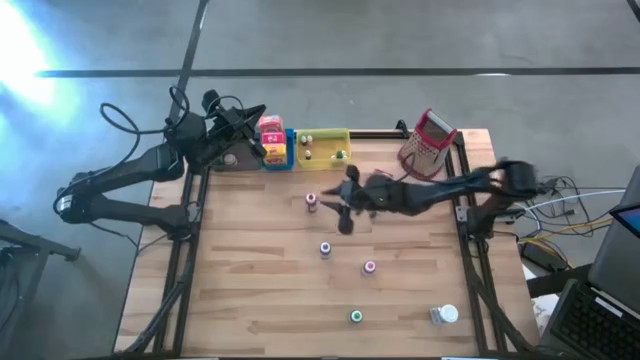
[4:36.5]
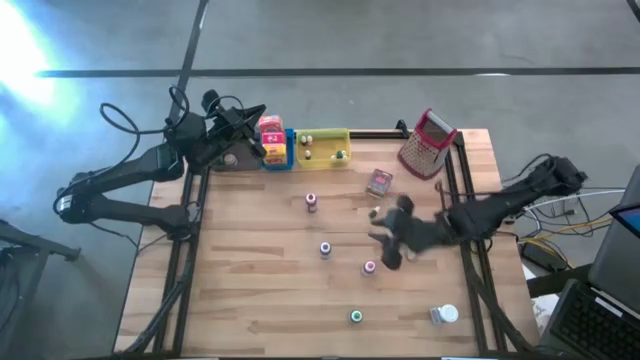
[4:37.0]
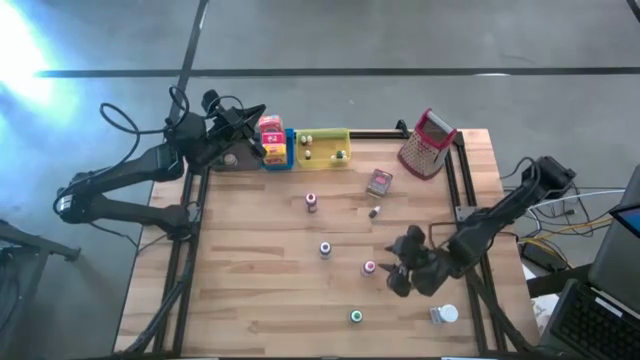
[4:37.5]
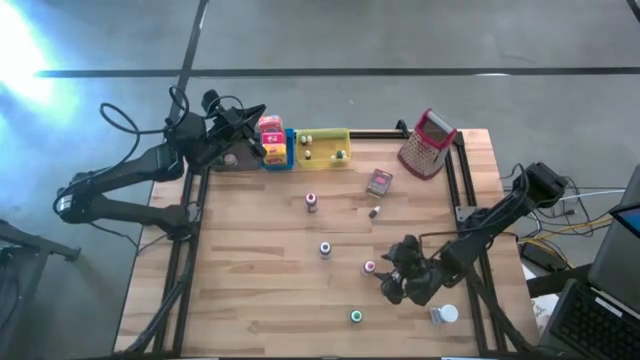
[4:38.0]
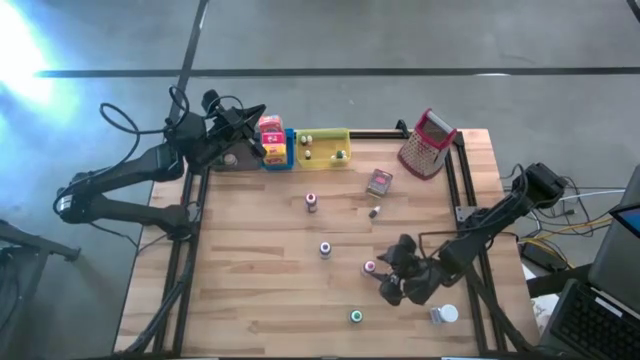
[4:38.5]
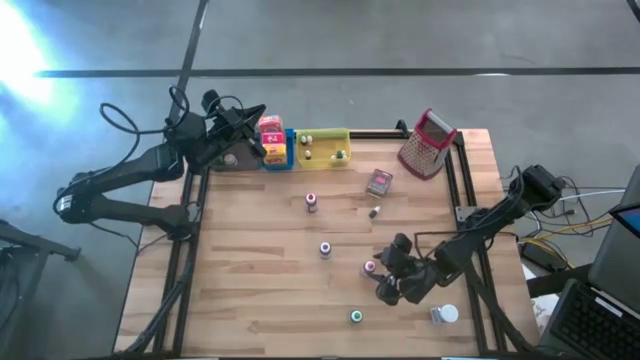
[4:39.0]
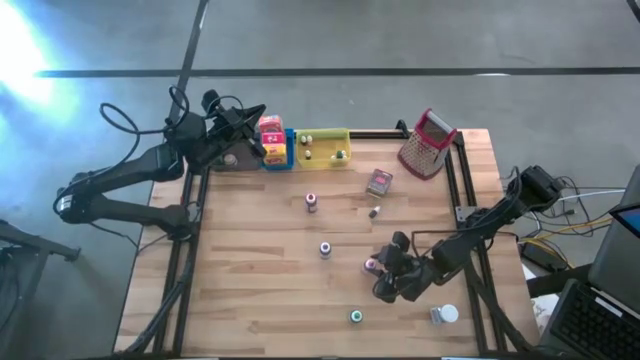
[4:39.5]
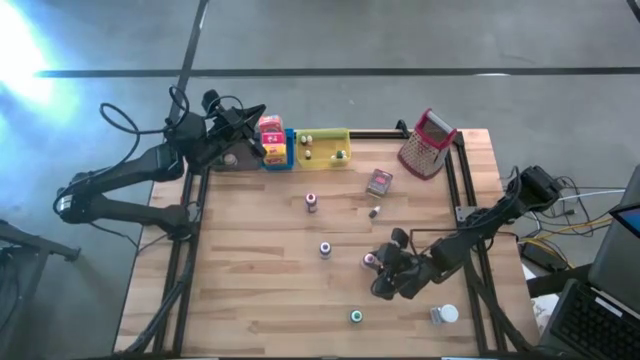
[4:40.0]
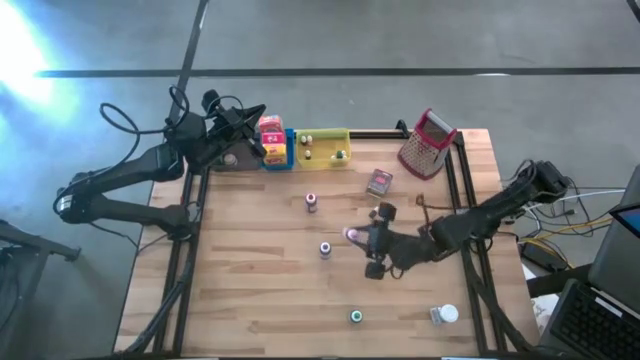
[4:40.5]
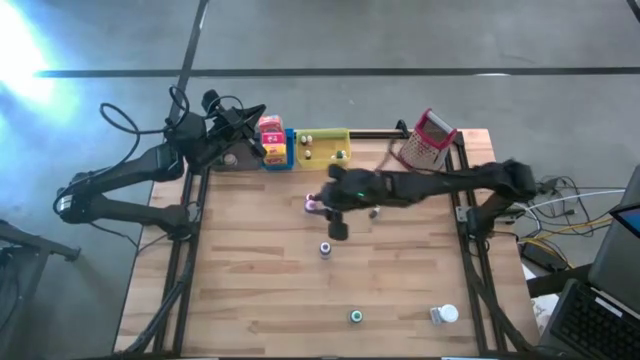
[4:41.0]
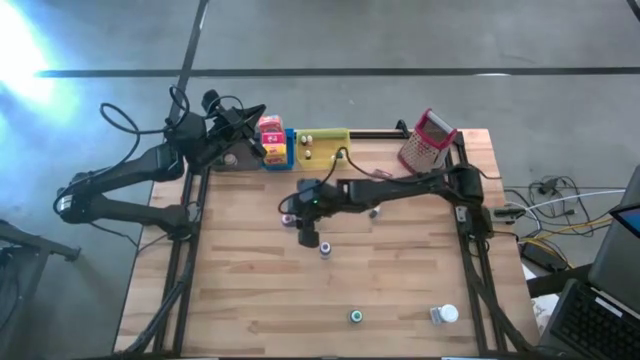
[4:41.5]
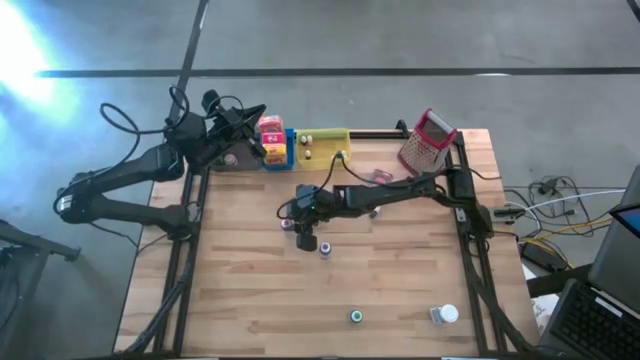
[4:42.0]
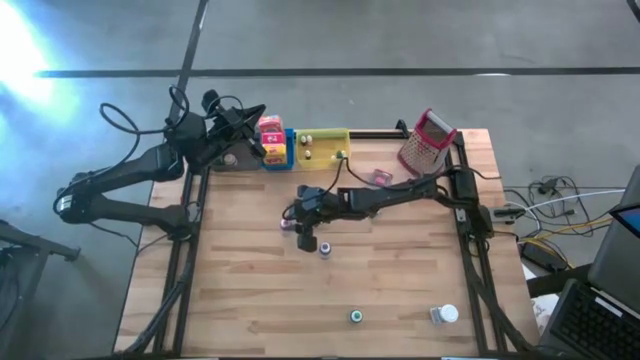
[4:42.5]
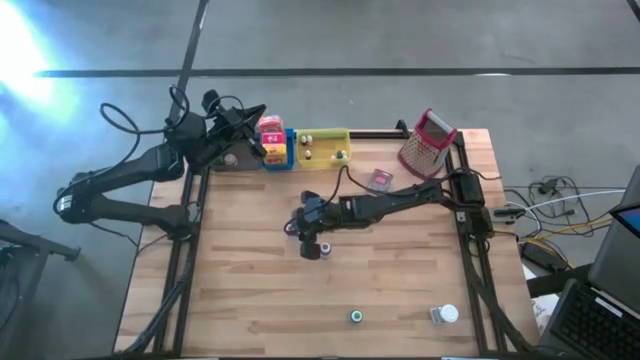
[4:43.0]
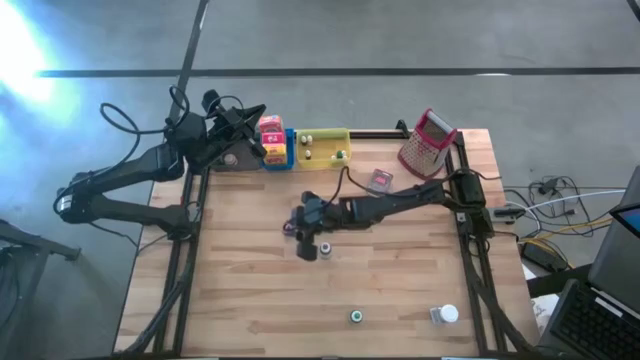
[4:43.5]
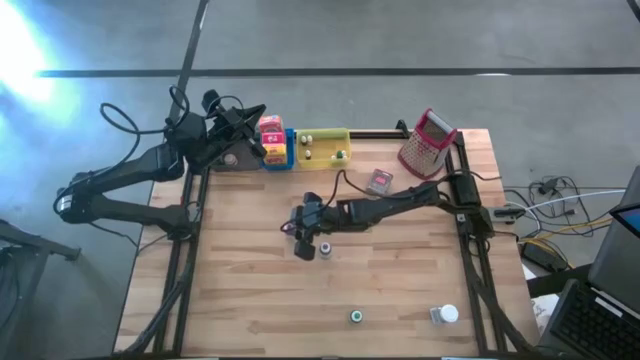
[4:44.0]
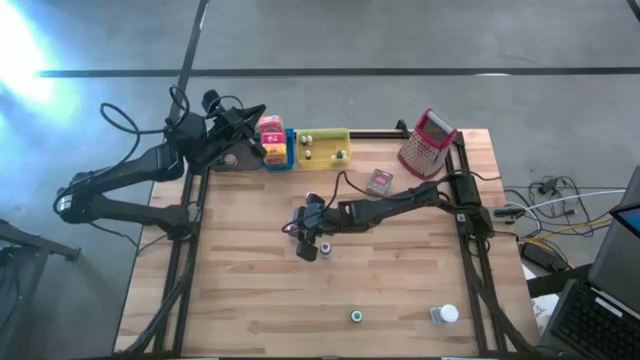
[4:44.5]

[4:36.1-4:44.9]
Task: Pick & Place Kitchen Items
Move the pink food coloring bottle to the center of the table

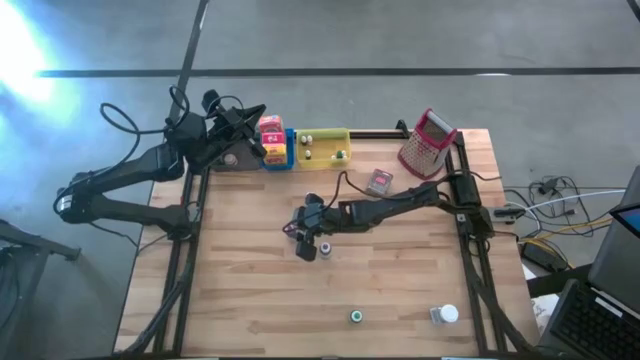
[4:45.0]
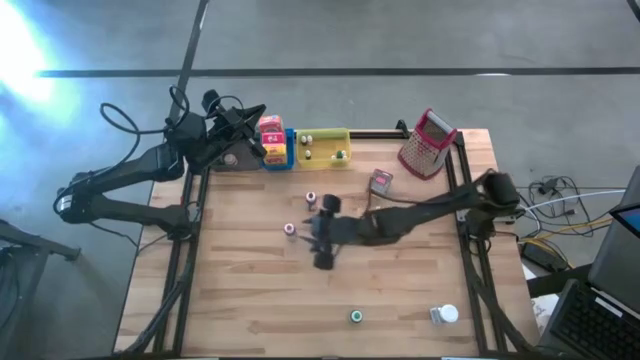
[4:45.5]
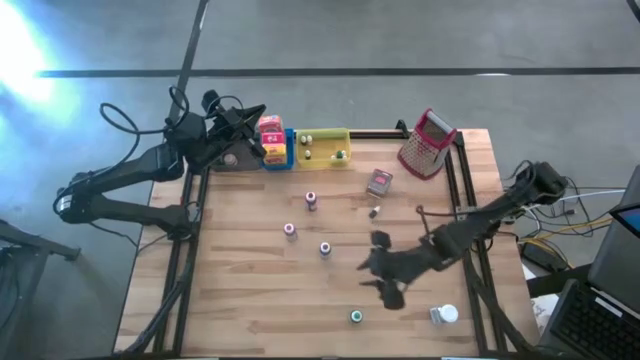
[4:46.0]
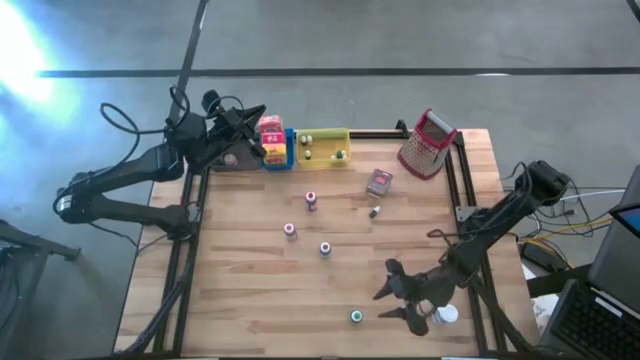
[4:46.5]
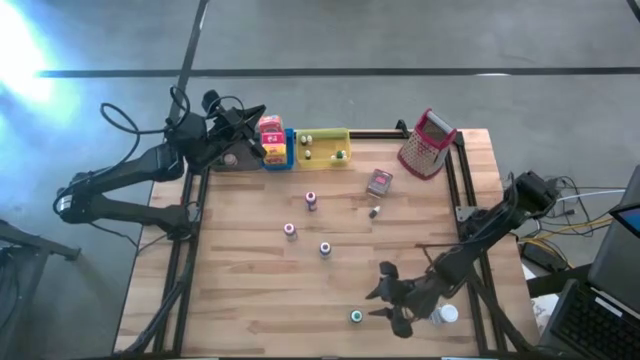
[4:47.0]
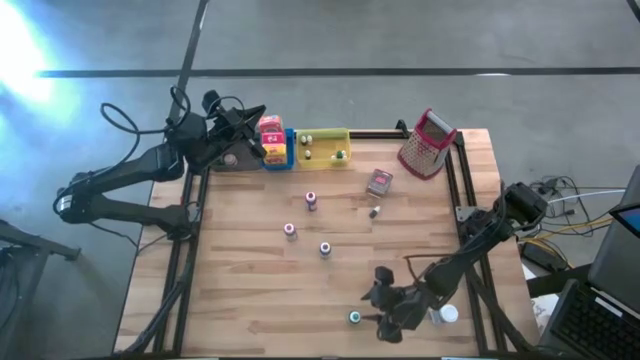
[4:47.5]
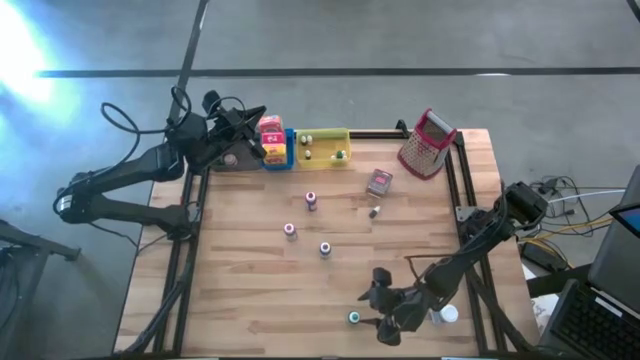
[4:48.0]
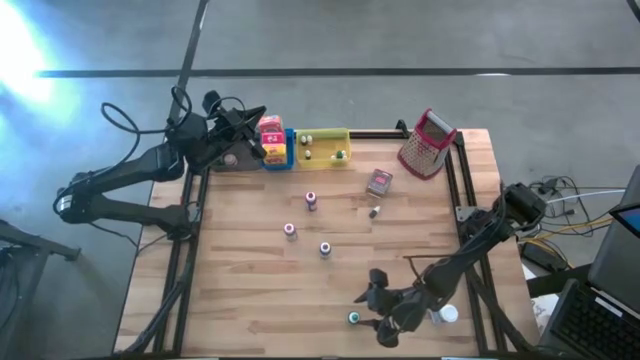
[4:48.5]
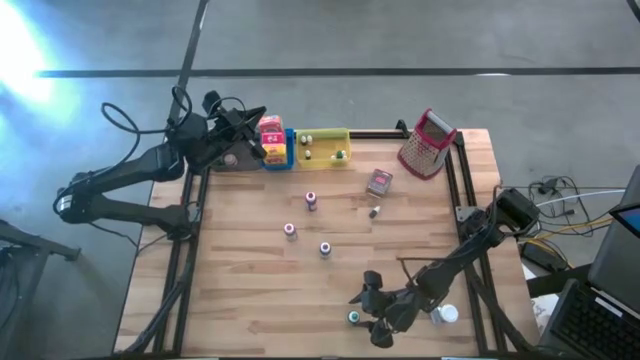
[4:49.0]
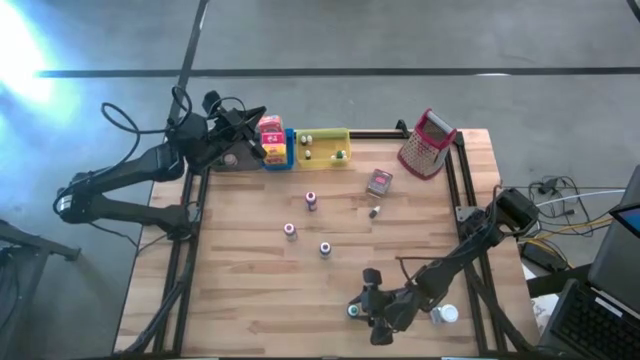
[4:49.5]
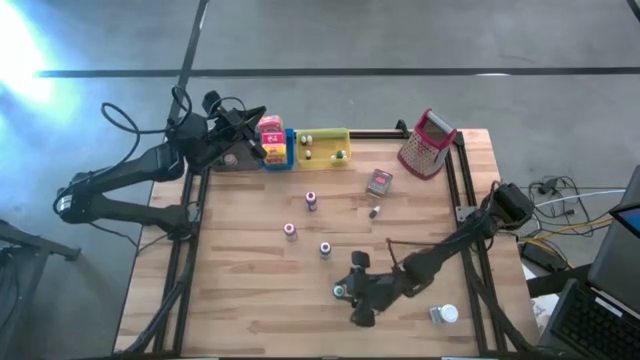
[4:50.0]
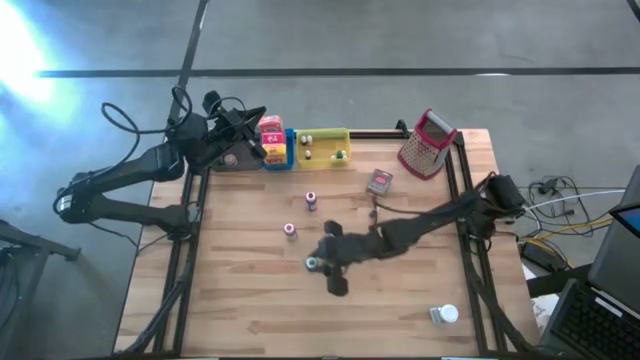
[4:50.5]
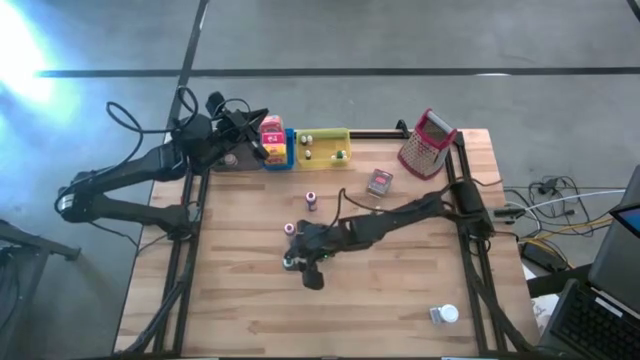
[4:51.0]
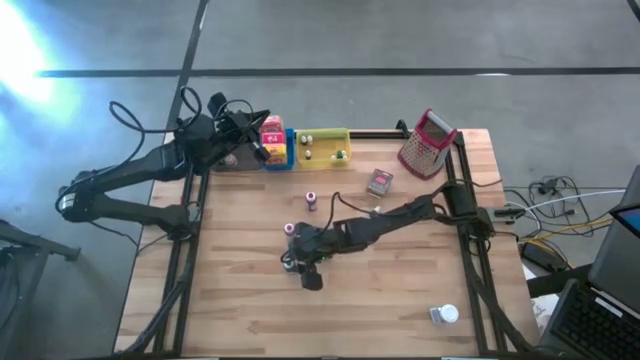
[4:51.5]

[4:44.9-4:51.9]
Move the large green food coloring bottle to the center of the table

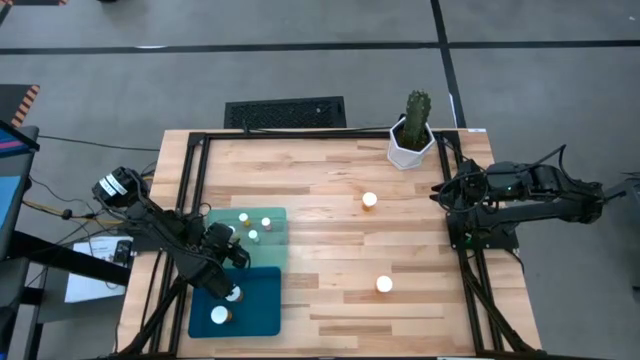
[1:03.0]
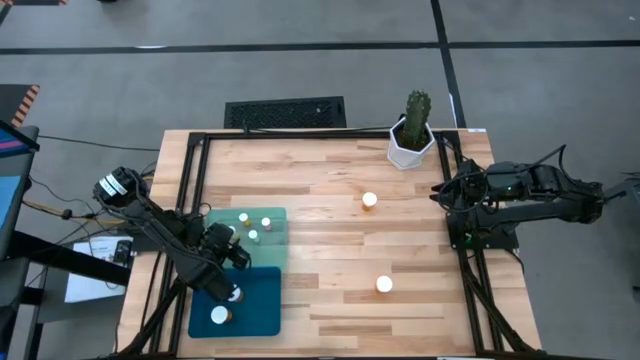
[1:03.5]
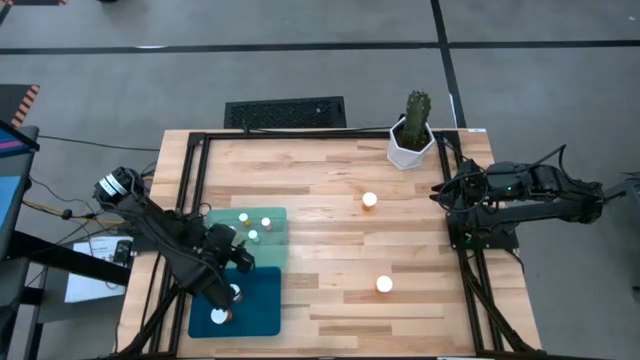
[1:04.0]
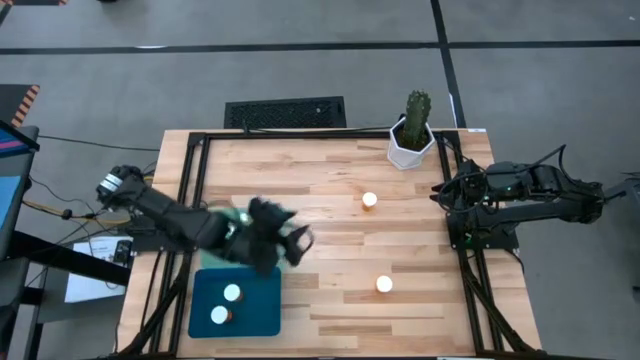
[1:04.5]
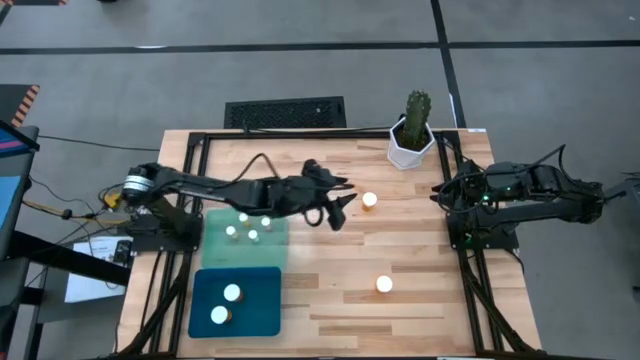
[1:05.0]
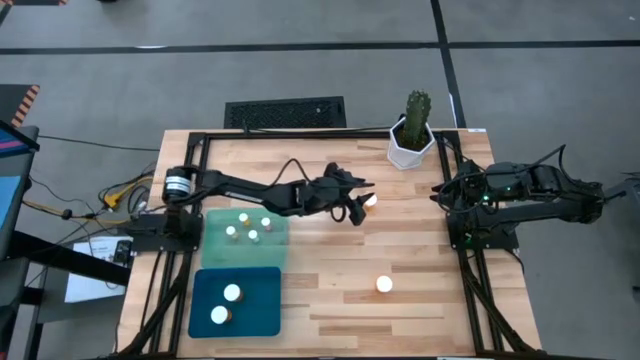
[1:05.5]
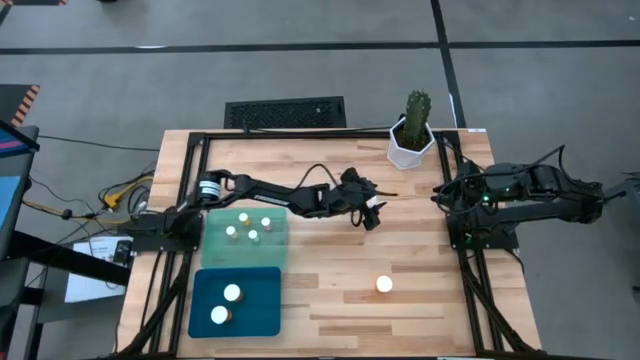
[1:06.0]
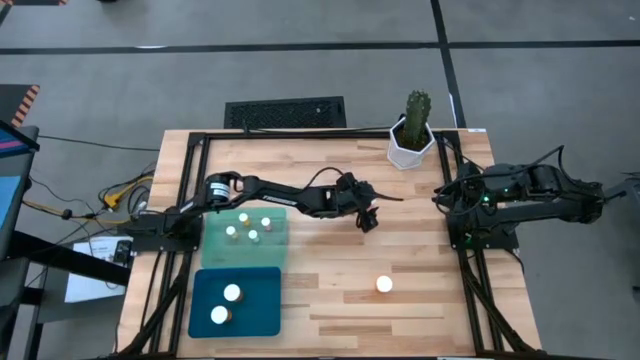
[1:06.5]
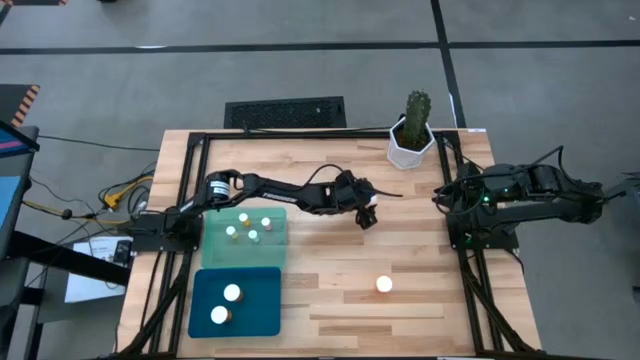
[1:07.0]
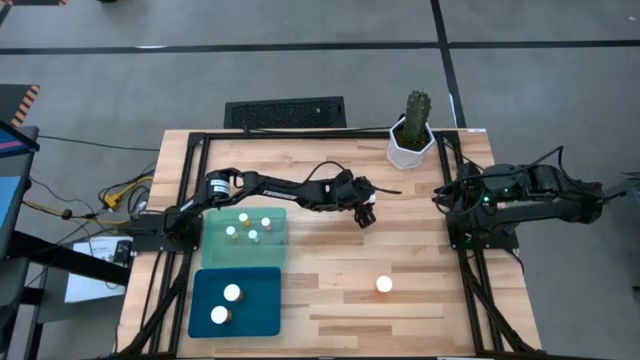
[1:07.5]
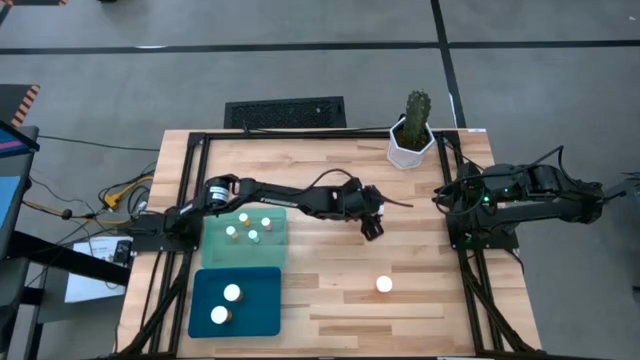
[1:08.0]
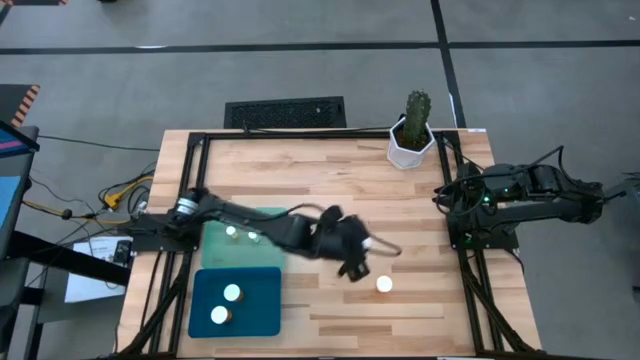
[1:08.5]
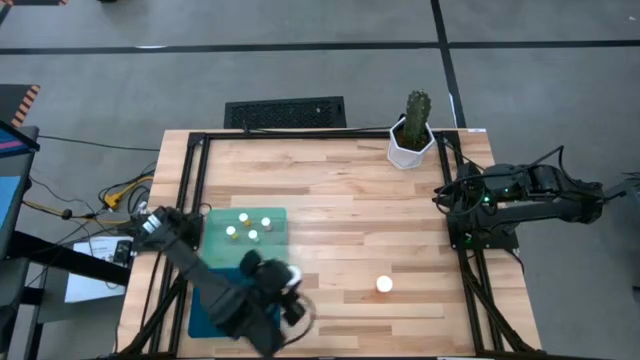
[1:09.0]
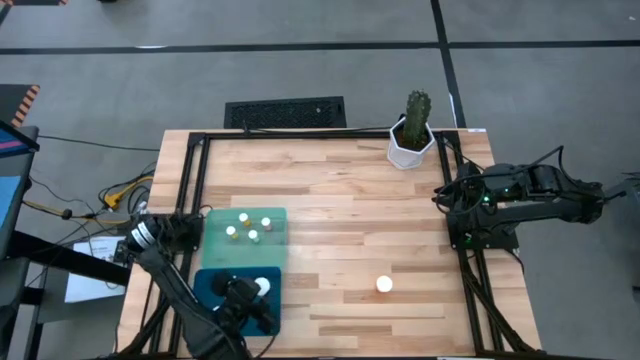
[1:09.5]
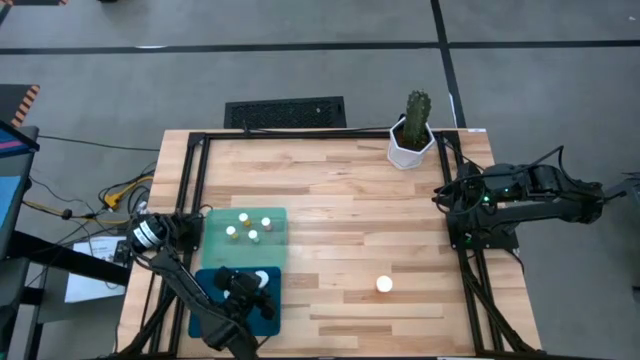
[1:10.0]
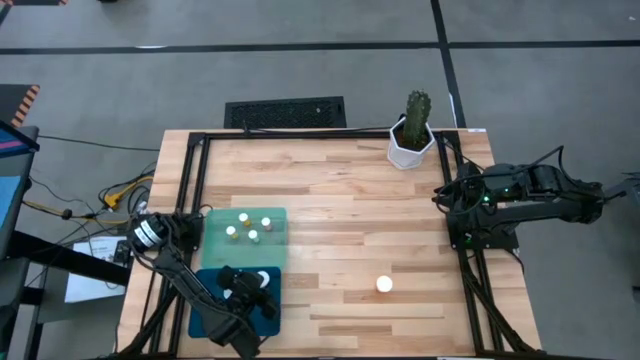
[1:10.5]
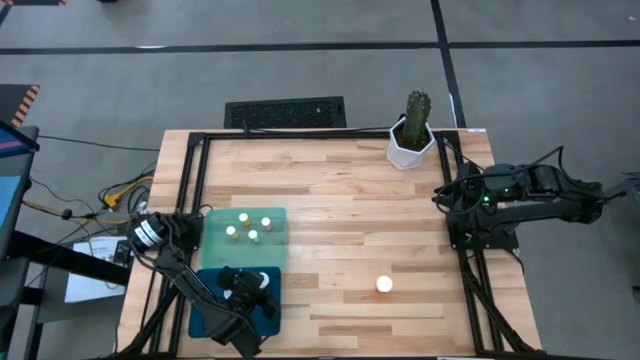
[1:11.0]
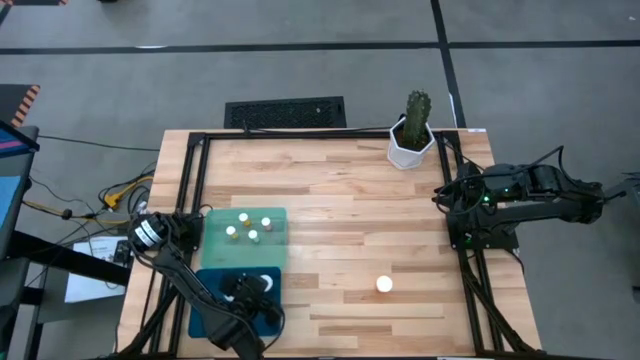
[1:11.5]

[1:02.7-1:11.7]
Task: Pick and place medicine bottles into bin by pill shape (circle, oval)
Put the top big orange pill bottle into the blue bin
